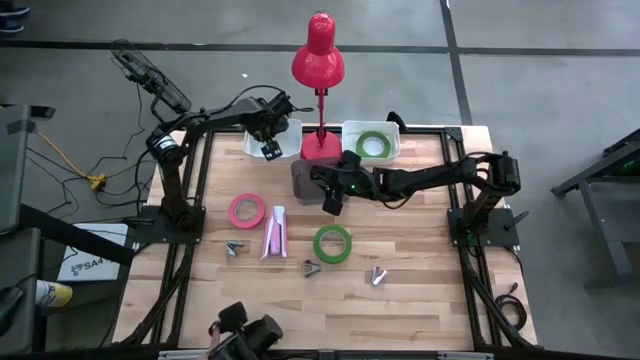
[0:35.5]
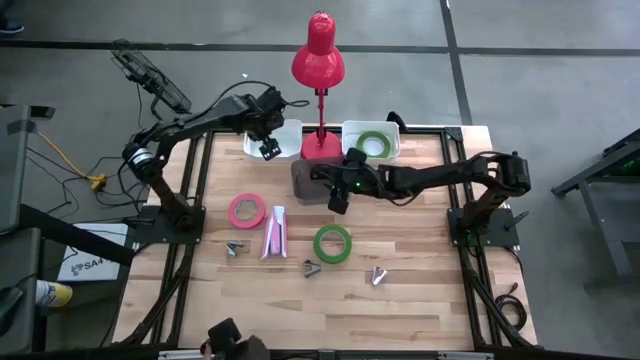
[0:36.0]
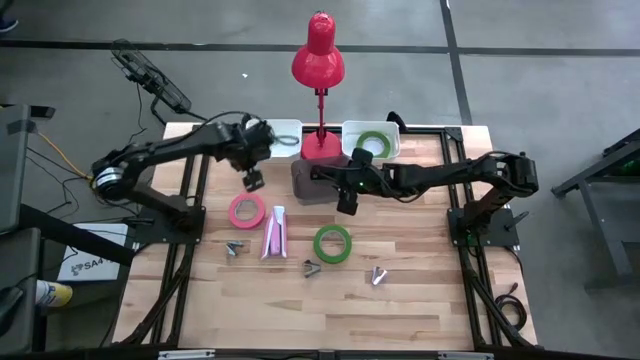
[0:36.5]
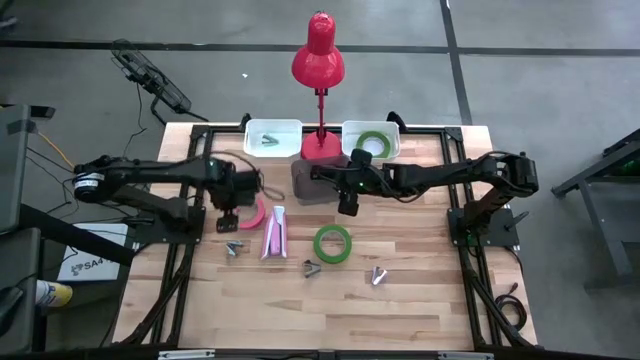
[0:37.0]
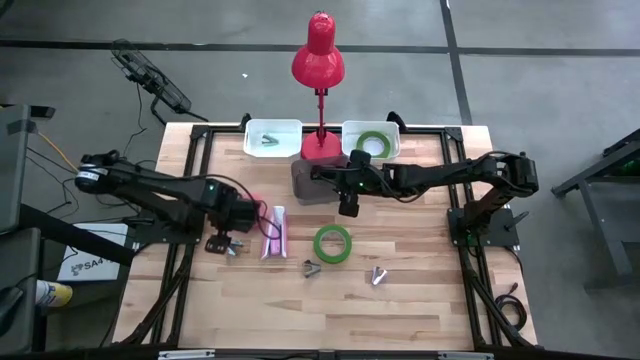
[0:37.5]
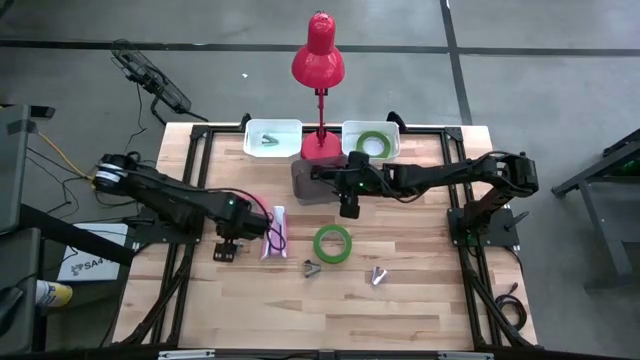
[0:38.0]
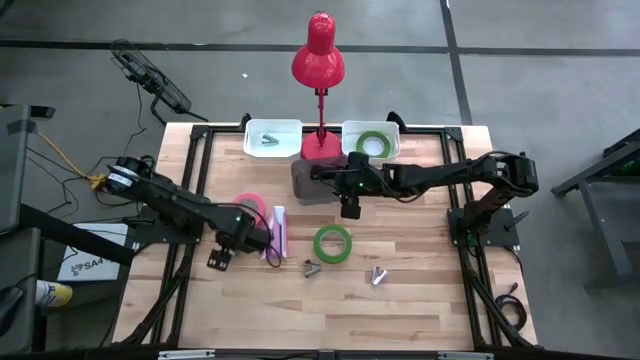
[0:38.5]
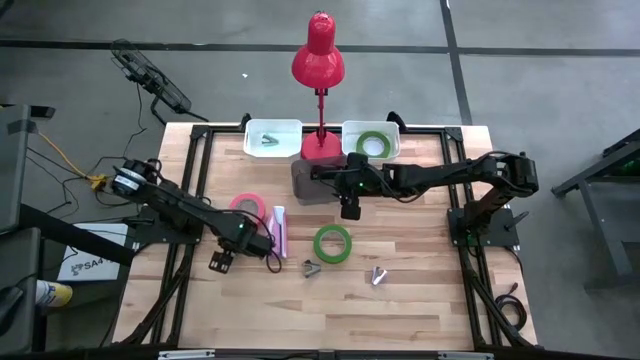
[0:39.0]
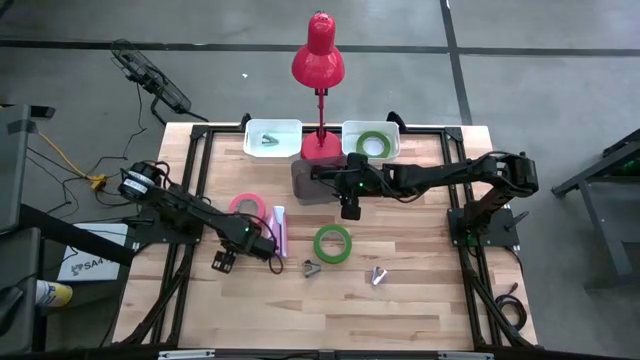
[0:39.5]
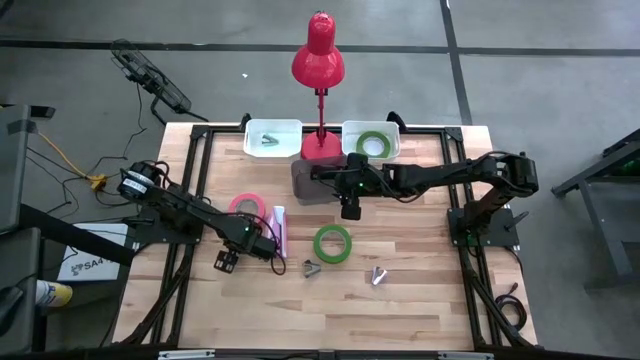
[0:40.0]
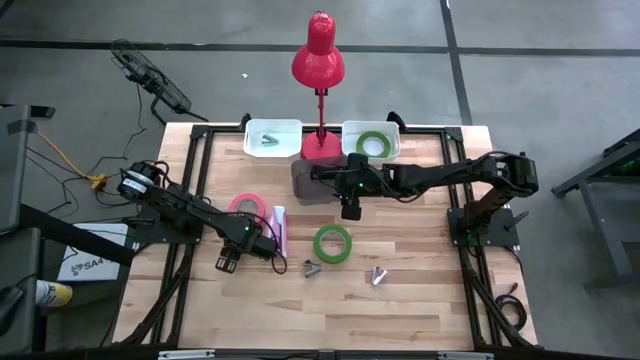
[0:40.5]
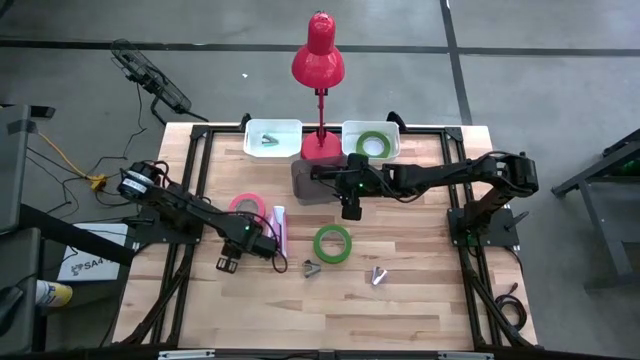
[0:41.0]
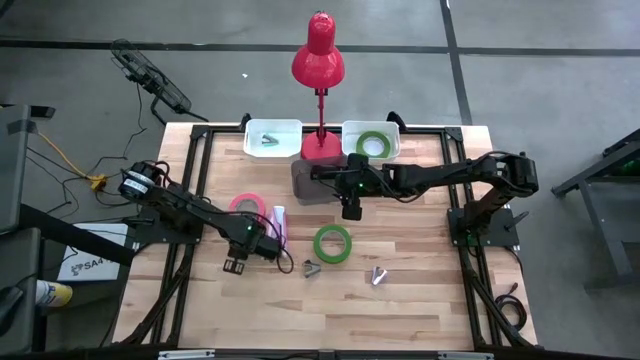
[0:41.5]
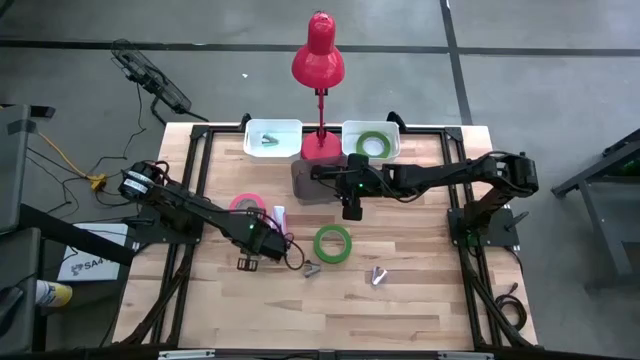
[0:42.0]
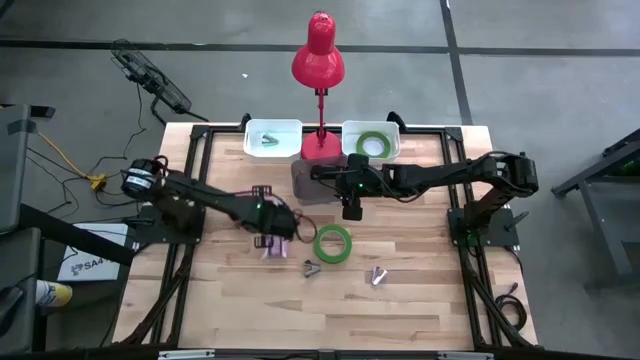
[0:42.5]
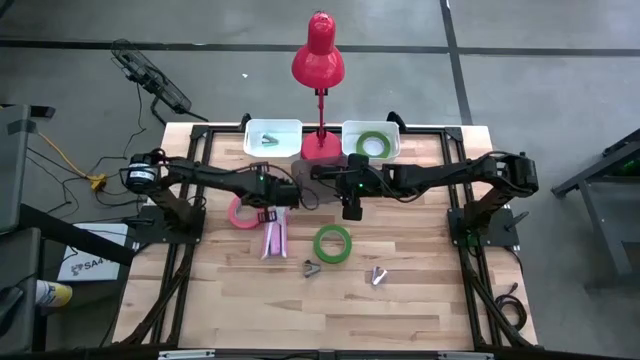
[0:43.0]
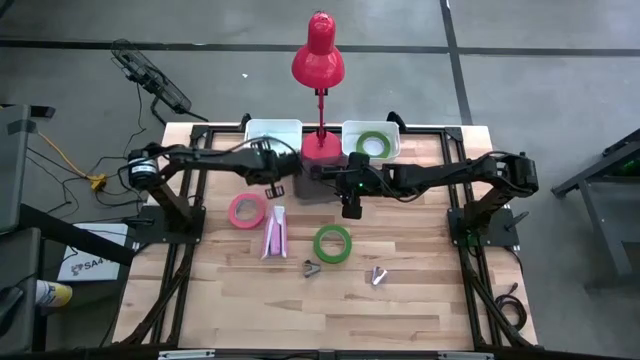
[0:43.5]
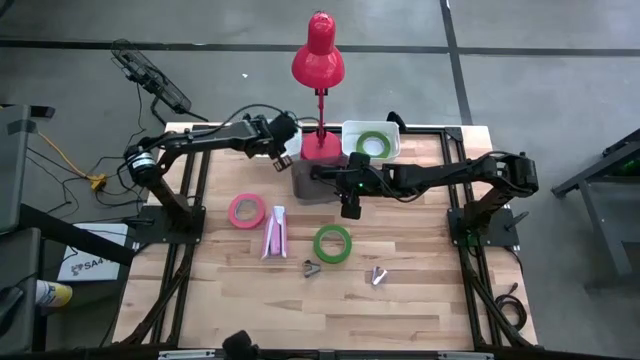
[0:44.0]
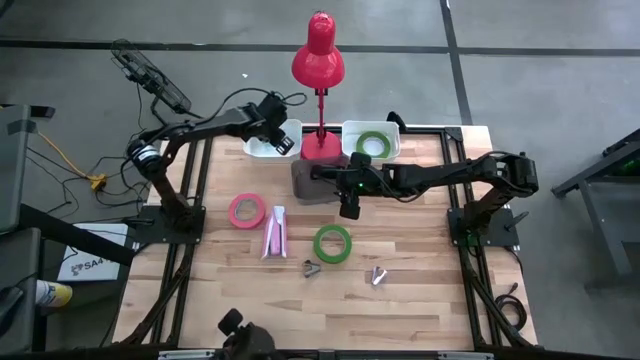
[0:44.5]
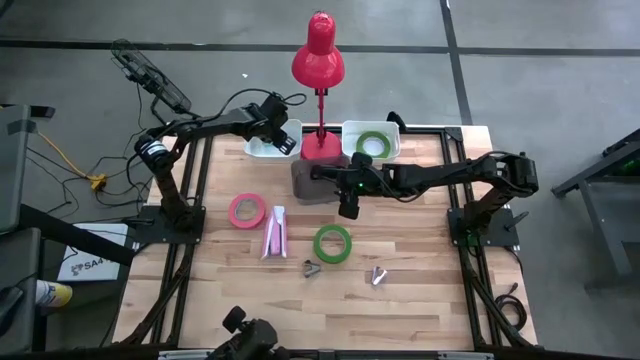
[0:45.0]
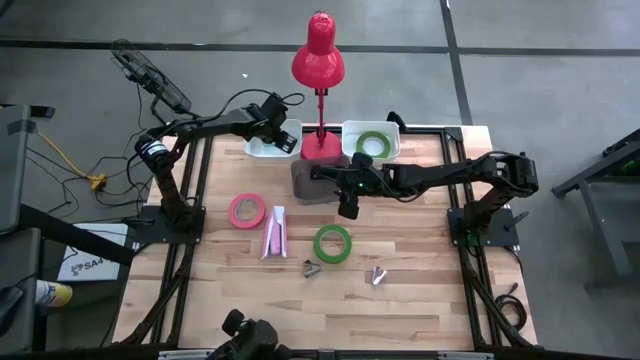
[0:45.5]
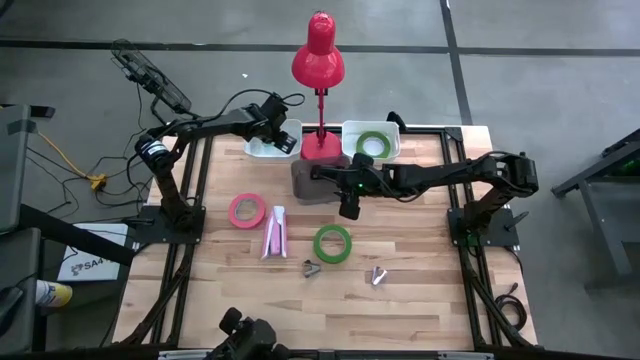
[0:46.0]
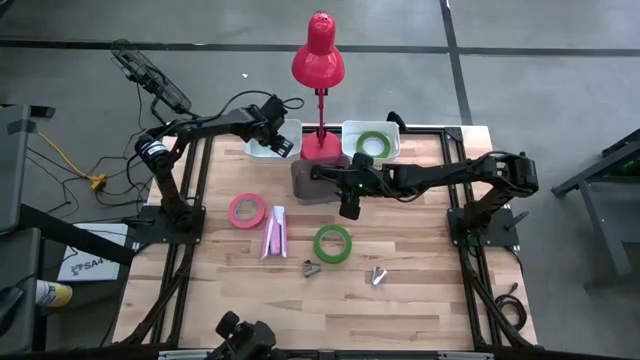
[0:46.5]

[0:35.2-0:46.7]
Task: Pick and place Stapler, Stapler remover, tape
Put the light blue staple remover into the left white bin

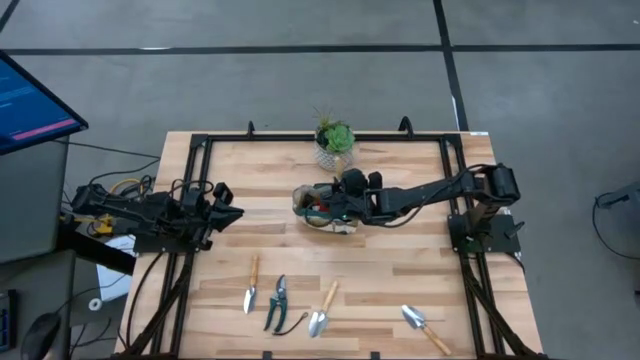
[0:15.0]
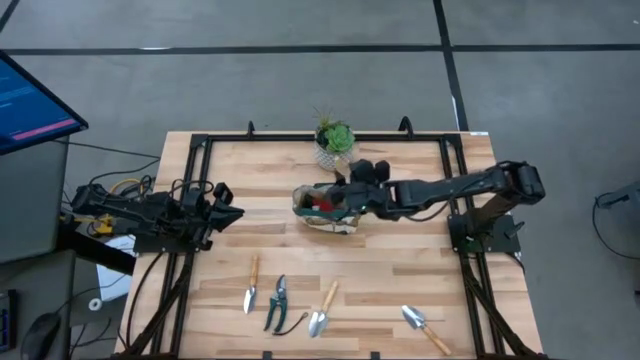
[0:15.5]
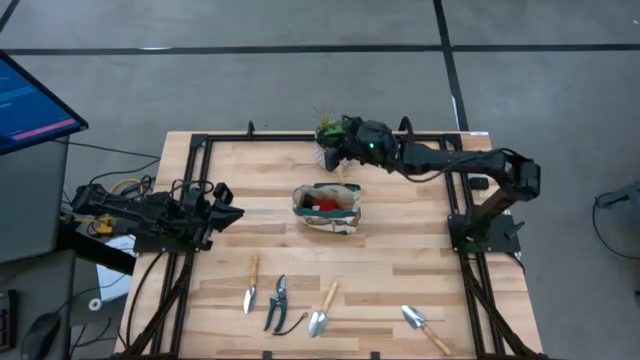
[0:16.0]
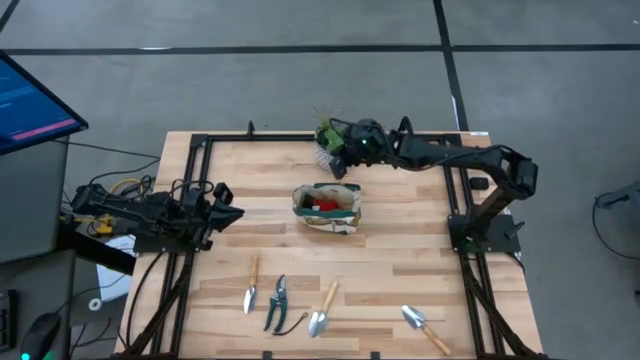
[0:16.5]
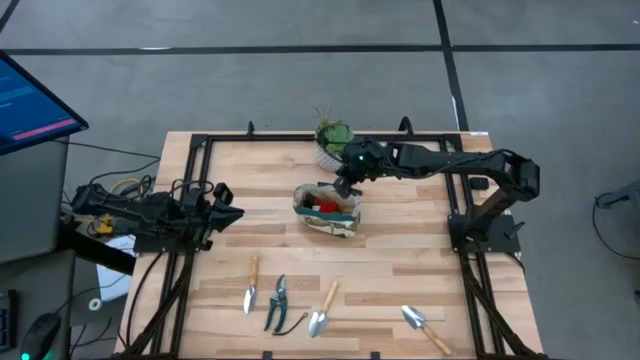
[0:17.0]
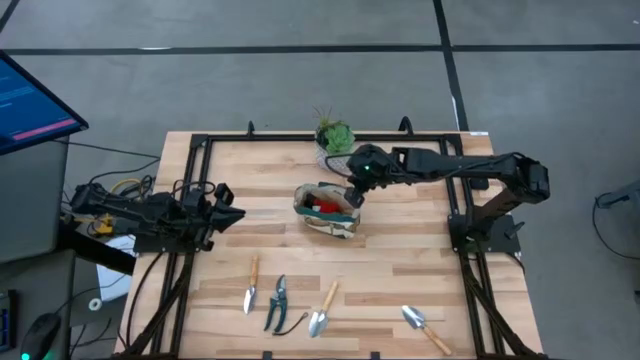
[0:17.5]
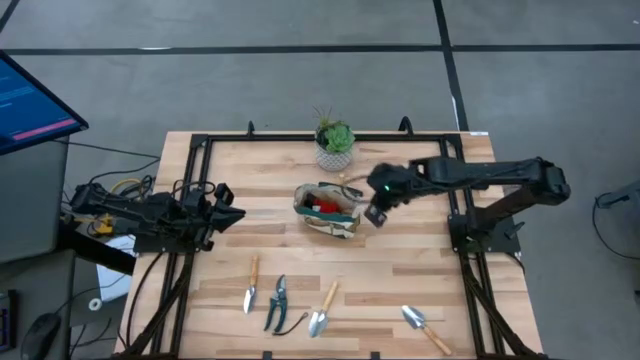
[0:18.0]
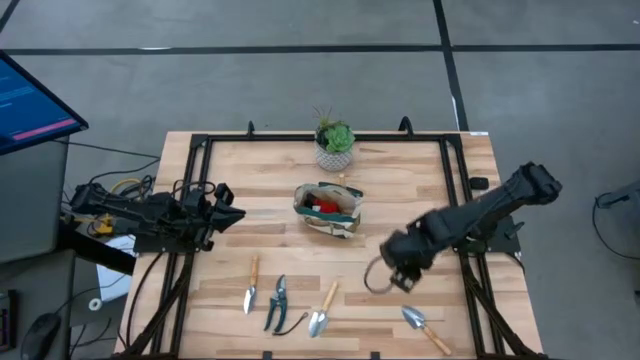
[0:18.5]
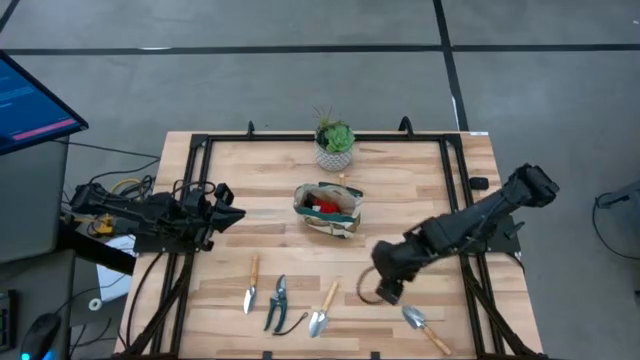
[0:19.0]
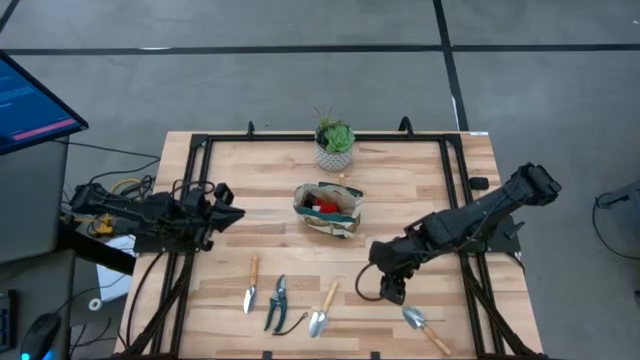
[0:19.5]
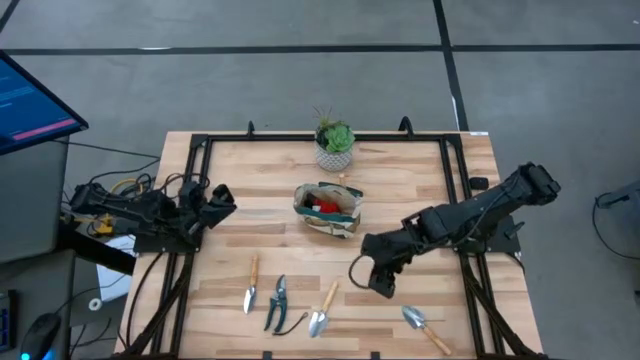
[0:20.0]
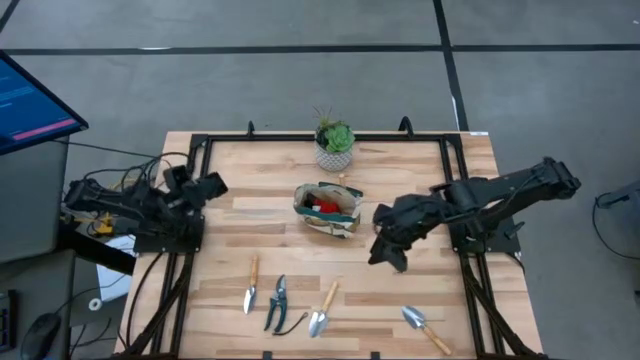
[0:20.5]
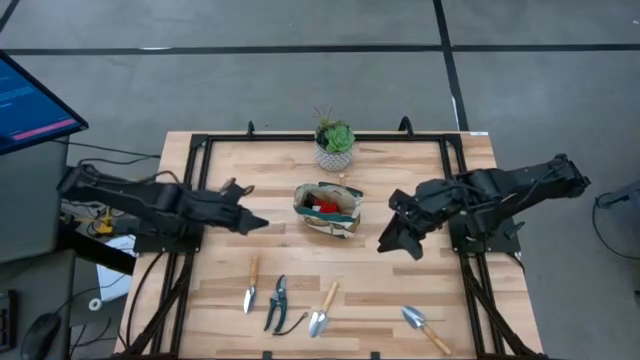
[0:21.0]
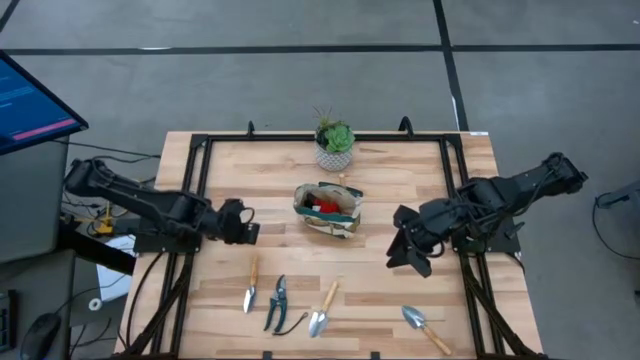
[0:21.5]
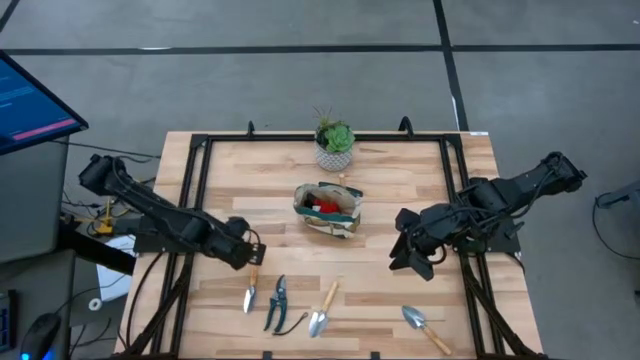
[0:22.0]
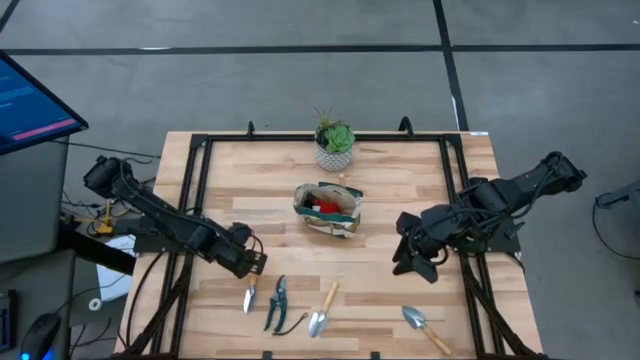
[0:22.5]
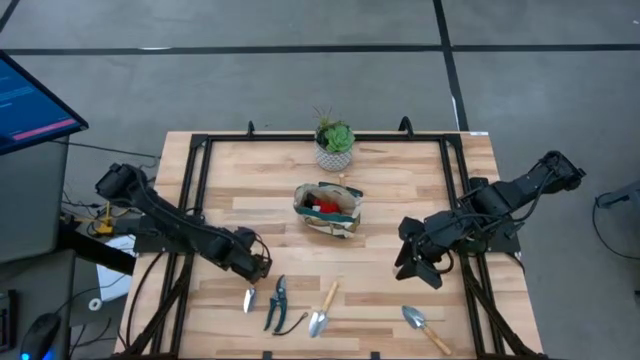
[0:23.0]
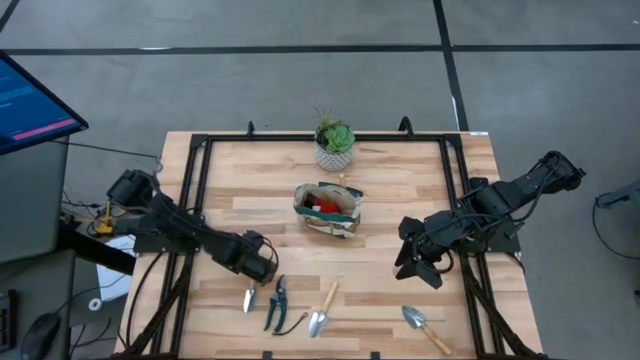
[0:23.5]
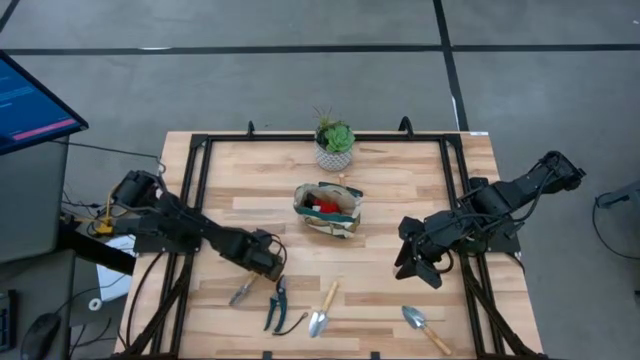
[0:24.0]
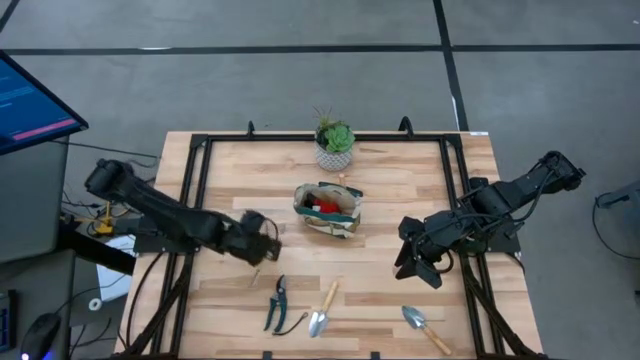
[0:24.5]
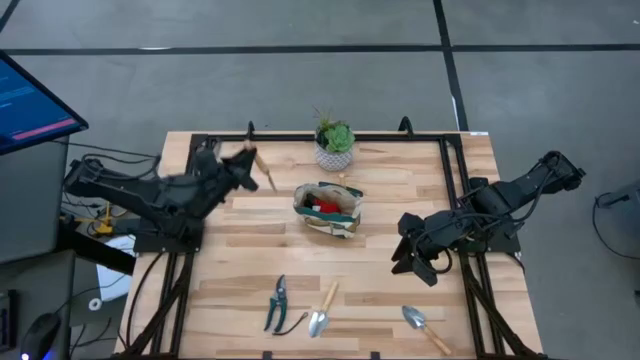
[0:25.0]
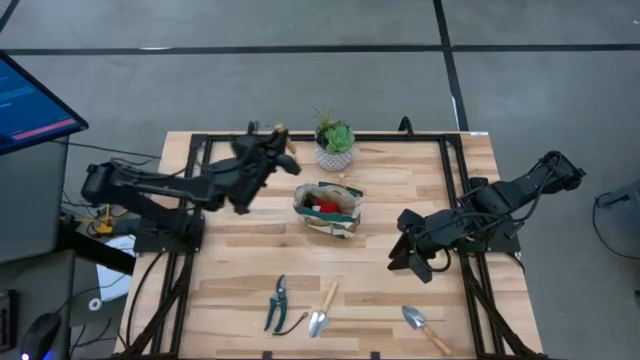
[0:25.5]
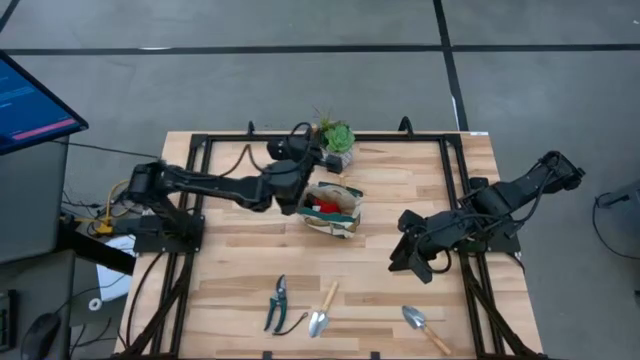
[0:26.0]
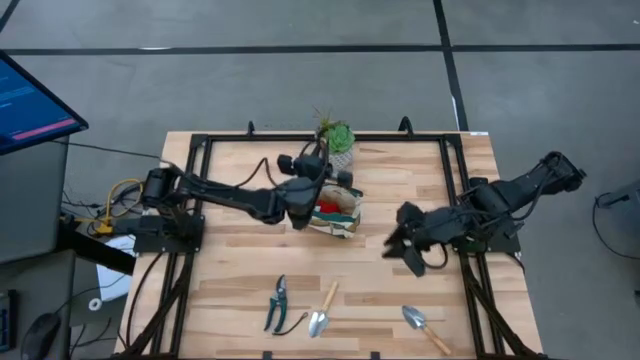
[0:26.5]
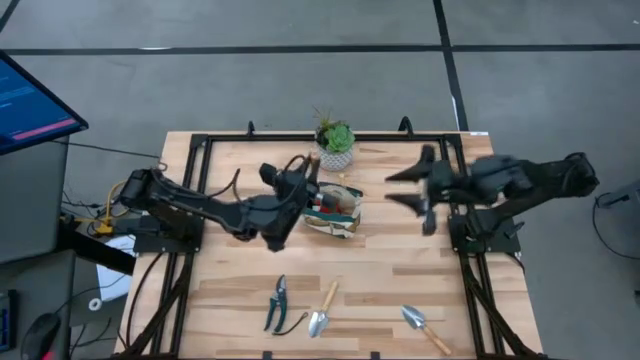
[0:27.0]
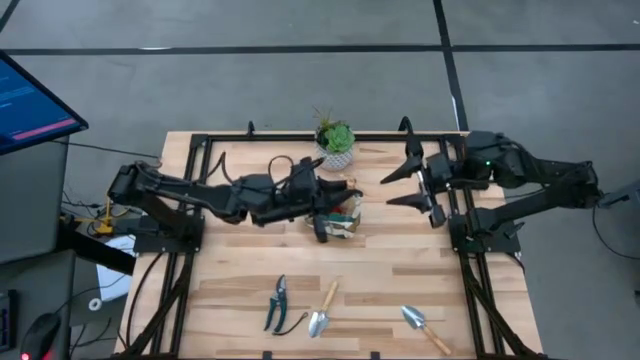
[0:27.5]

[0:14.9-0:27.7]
Task: Pick & Place Garden tools in Gardening bag
Put the trowel into the gardening bag
